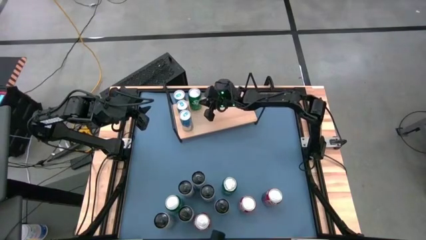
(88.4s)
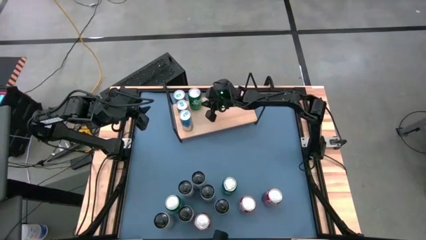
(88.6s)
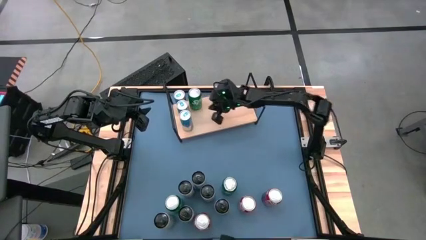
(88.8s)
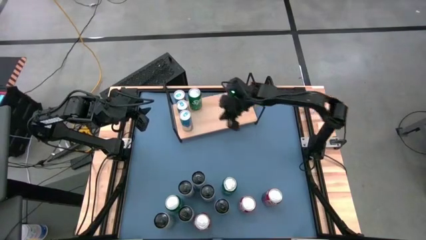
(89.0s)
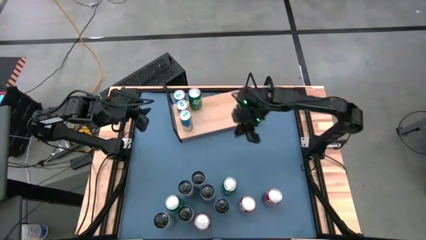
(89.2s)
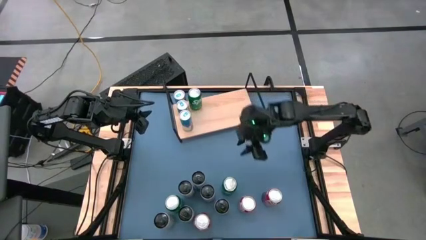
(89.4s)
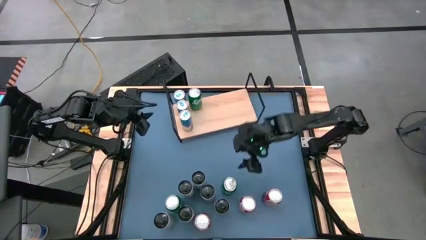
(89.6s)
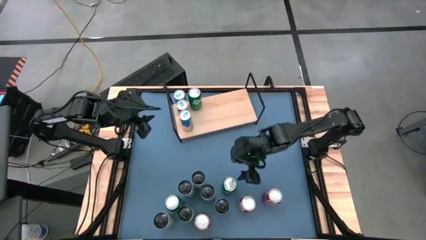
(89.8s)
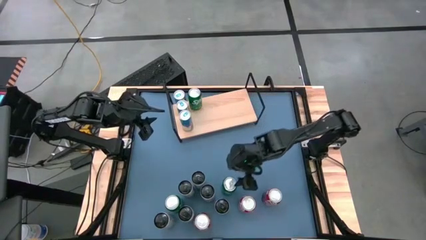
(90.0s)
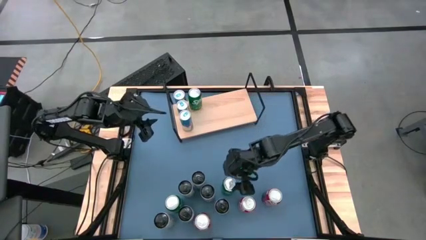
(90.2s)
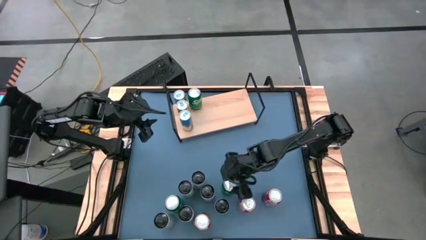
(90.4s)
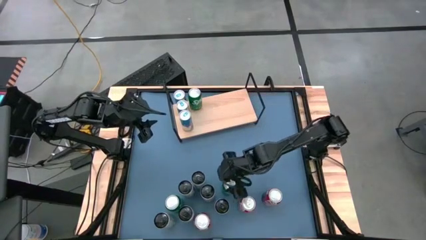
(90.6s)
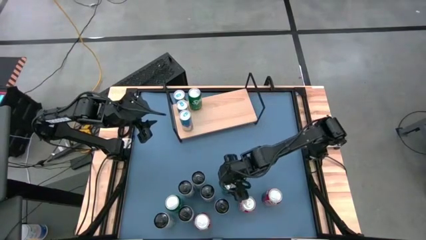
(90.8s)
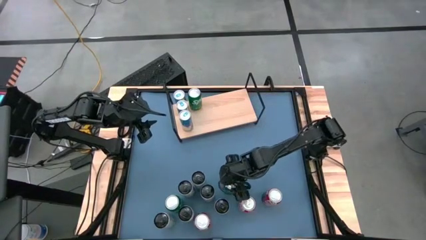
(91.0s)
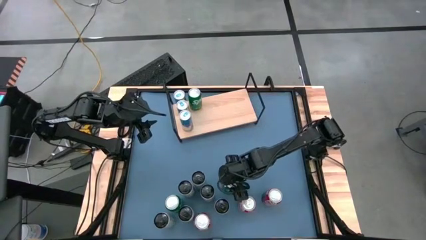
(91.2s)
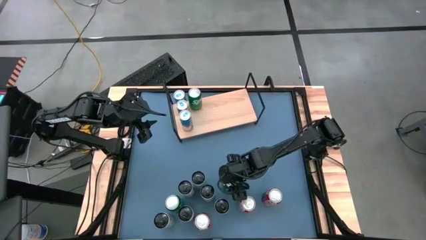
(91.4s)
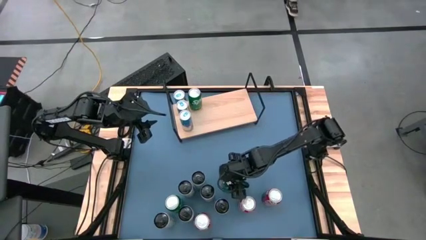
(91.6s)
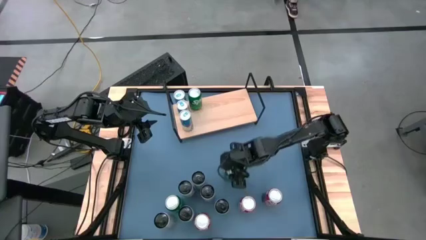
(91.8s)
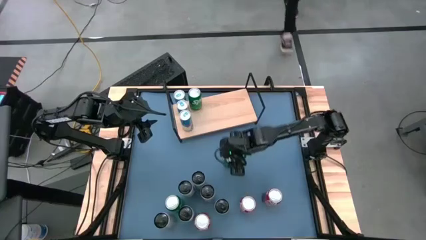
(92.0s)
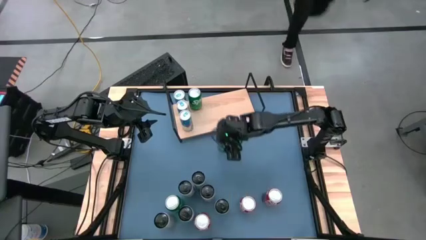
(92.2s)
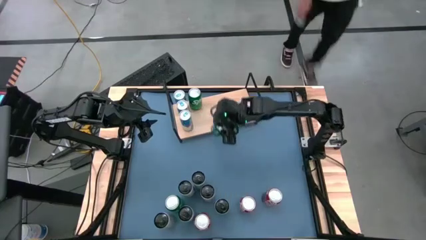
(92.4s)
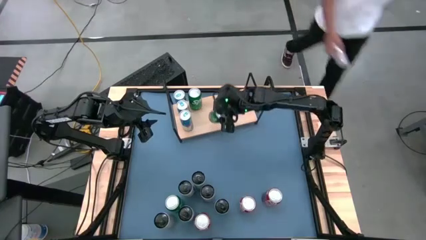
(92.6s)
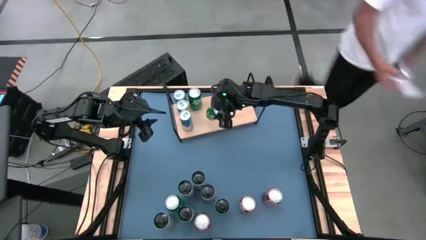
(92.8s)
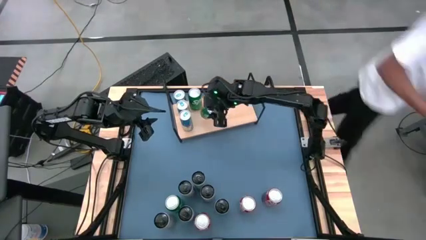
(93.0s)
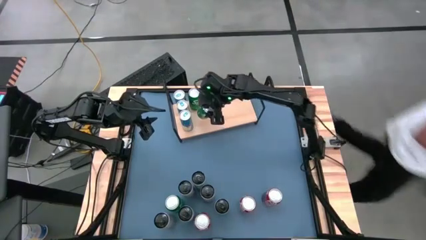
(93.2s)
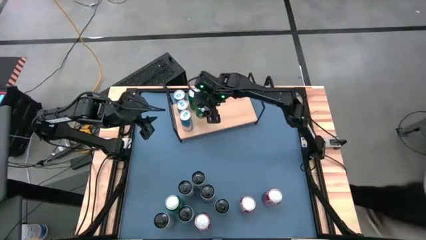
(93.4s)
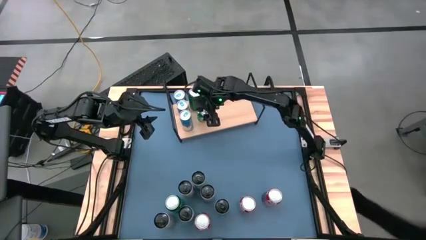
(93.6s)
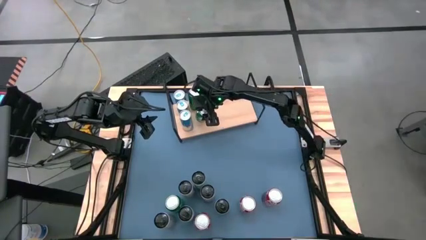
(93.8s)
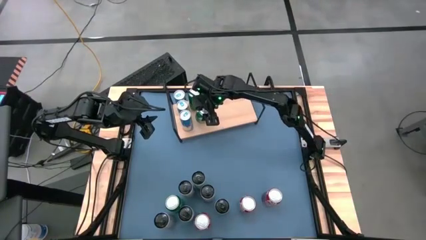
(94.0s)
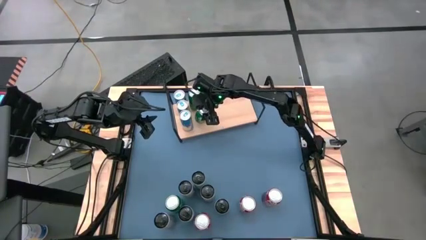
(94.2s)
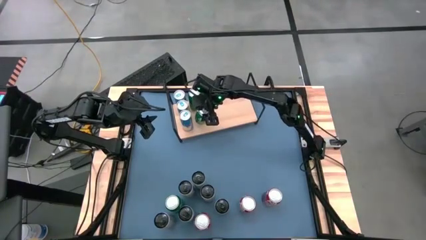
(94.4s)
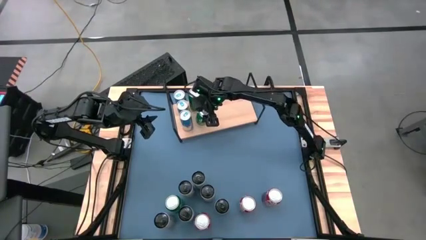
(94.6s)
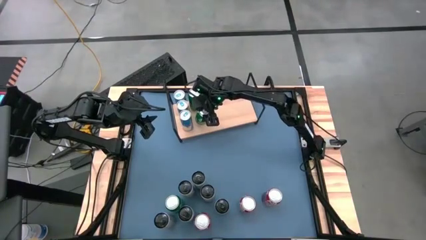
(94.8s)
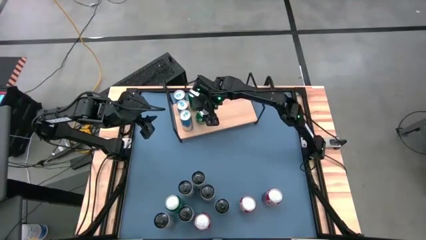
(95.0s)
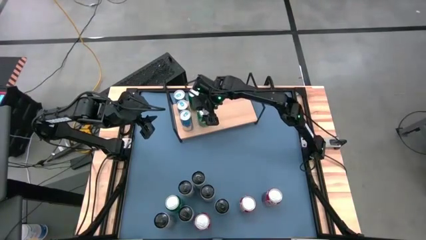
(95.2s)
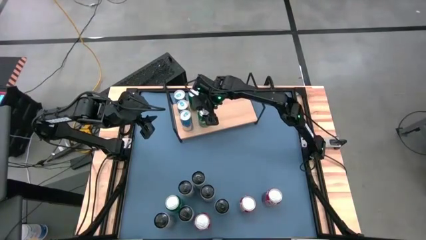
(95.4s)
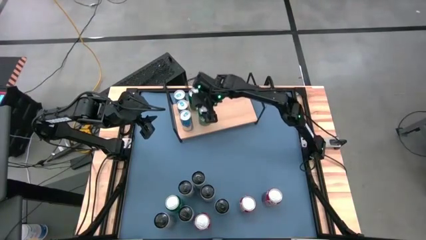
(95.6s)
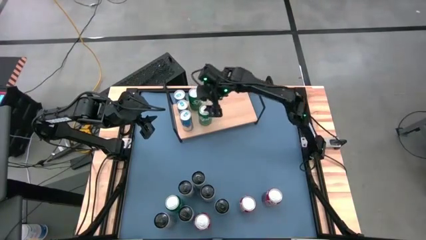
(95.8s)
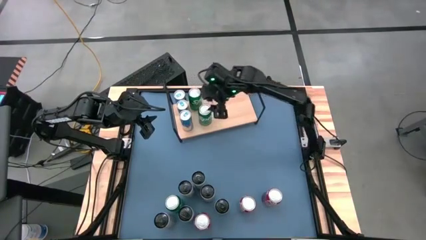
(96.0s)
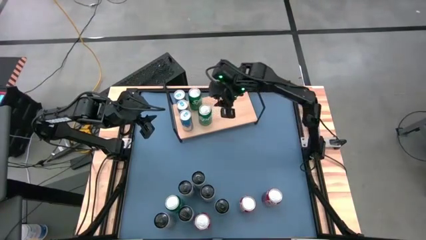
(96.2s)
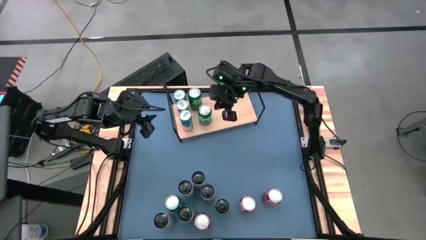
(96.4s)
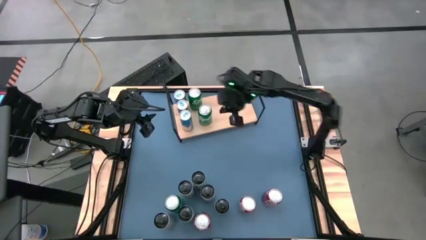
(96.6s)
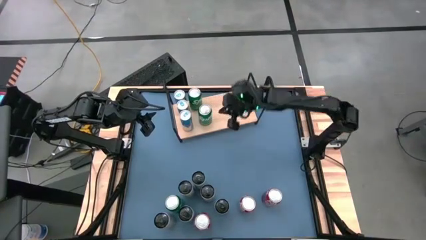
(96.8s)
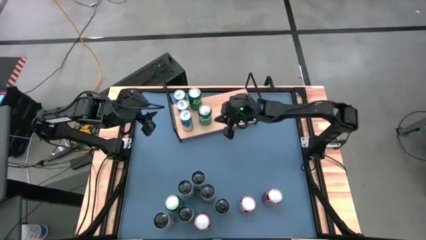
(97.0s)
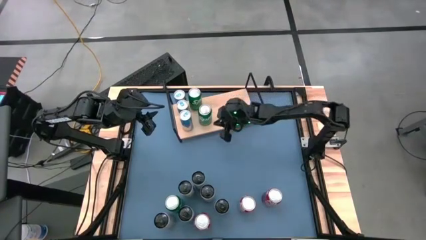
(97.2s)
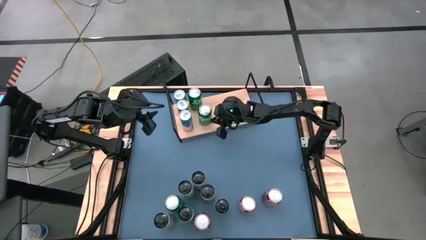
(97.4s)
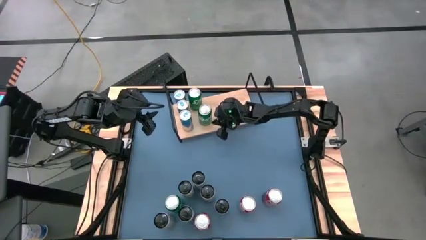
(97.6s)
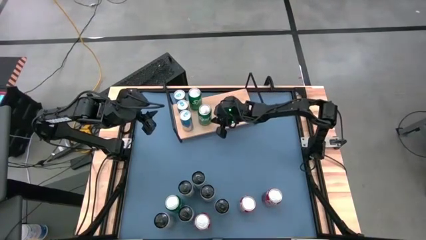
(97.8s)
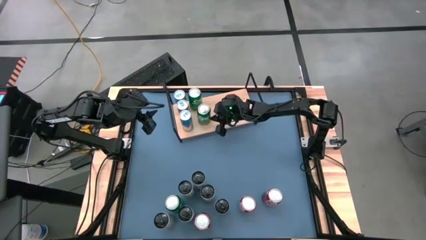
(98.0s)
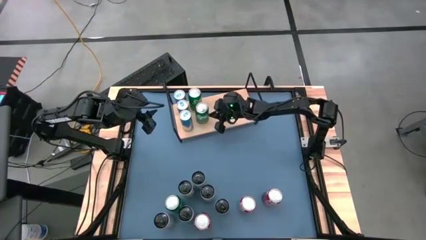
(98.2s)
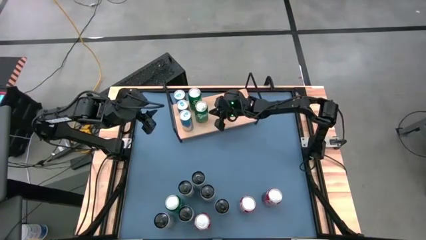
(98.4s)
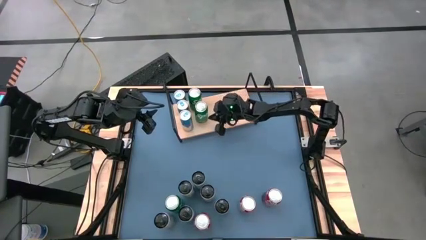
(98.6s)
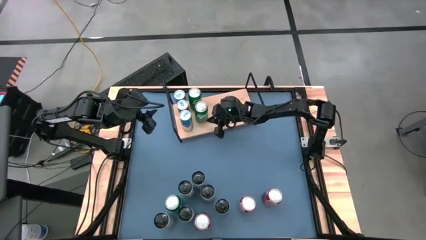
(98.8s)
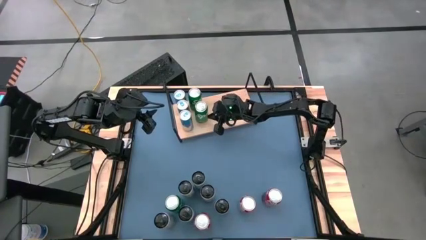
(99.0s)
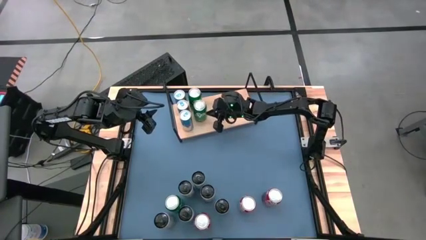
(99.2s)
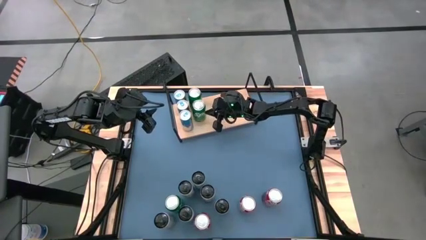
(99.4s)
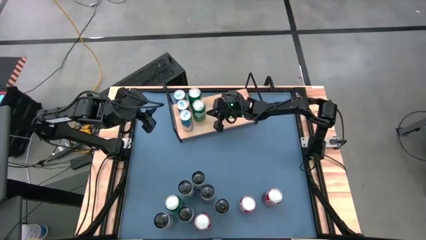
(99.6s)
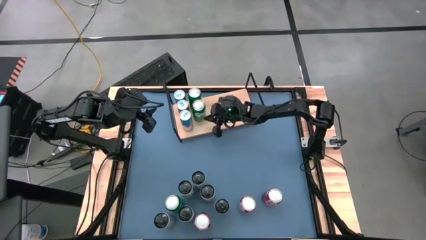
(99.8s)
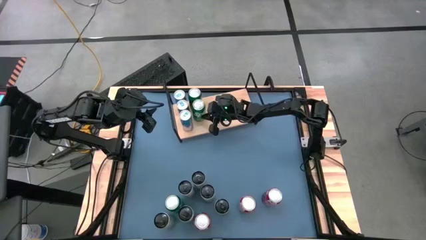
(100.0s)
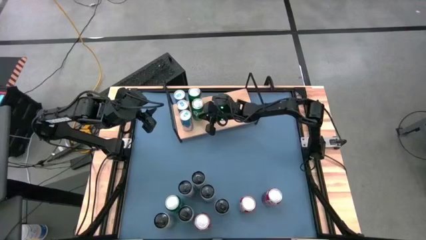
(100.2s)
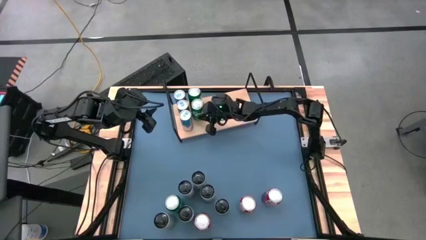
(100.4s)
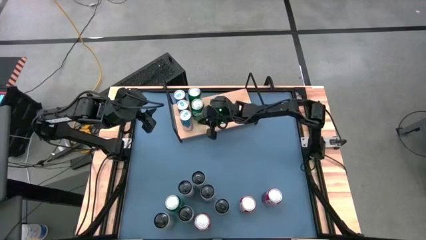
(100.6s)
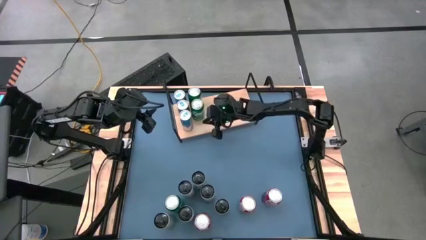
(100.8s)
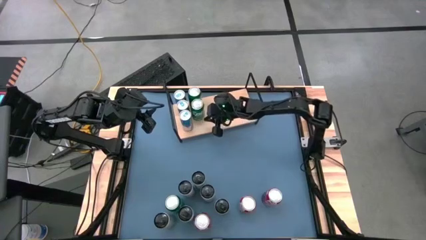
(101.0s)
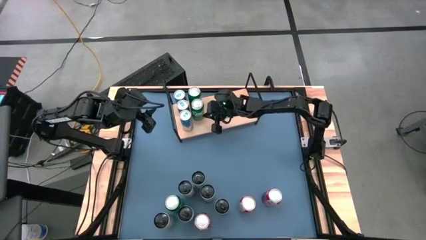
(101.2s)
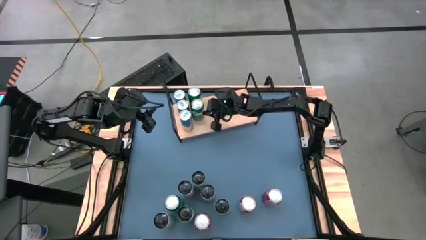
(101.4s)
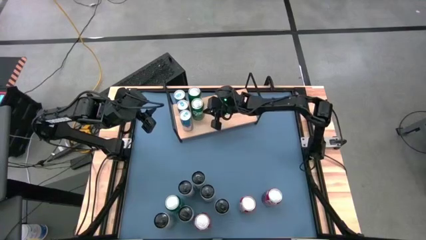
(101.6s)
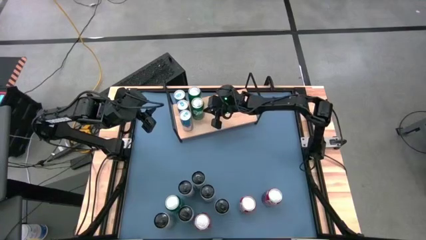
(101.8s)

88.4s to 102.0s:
Task: Place canned beverage on shelf
Put the top green soda can on the shelf aligned with the other green soda can
